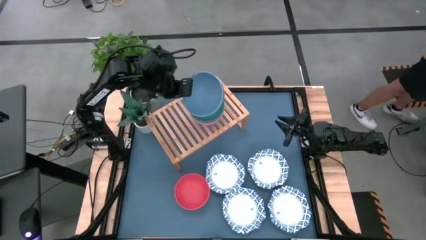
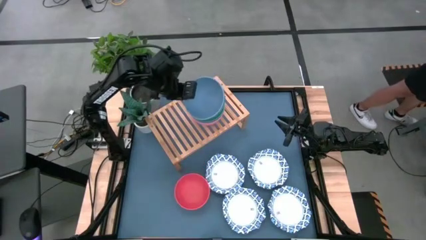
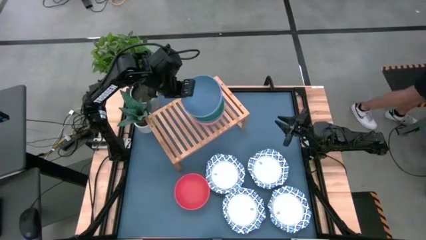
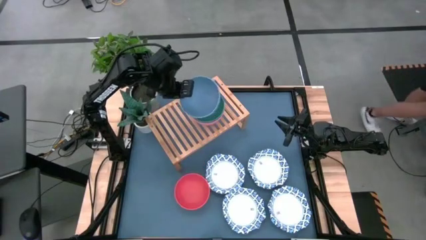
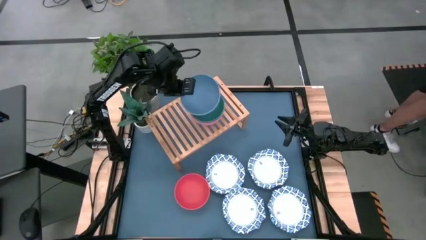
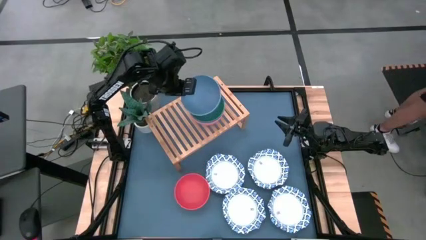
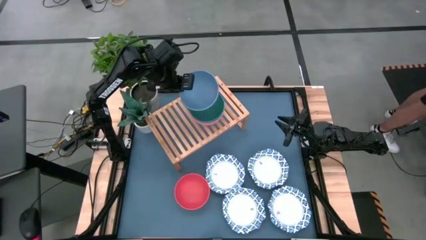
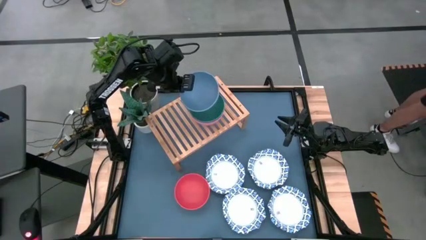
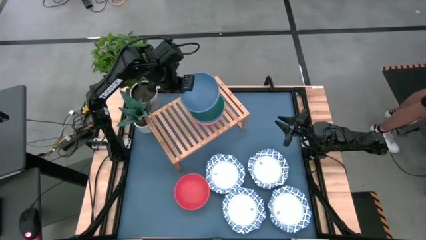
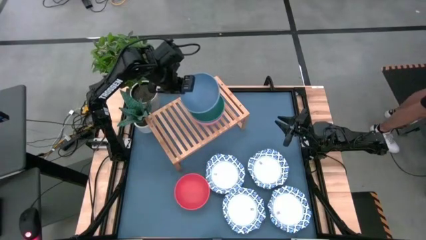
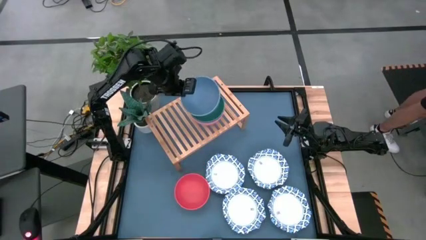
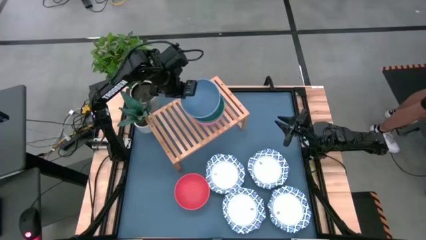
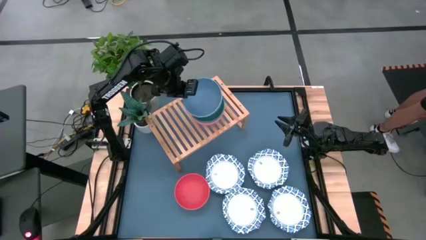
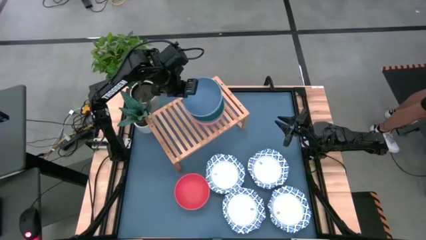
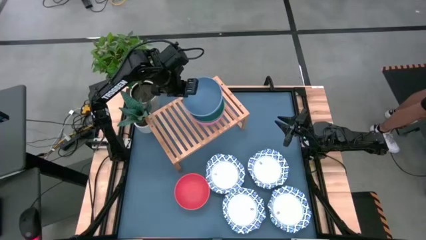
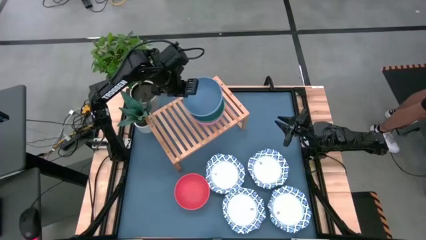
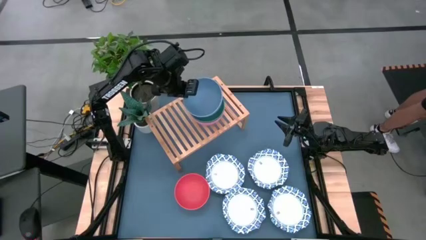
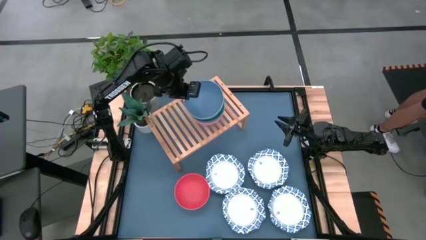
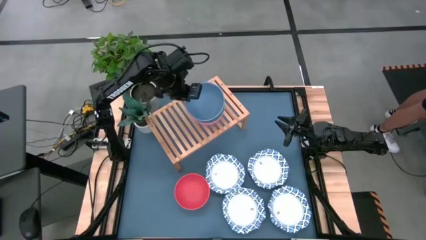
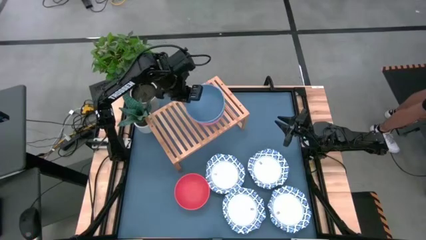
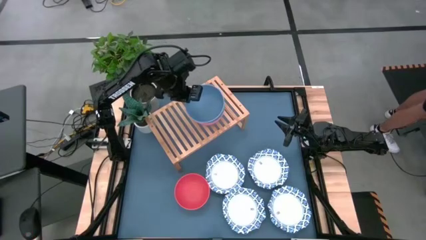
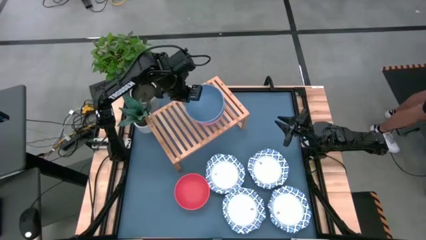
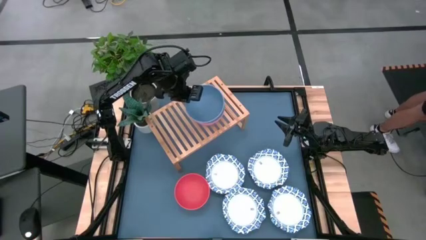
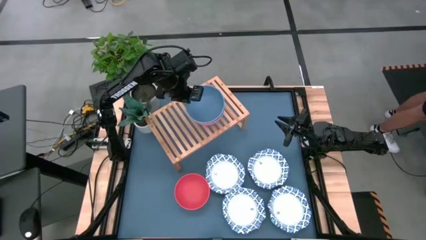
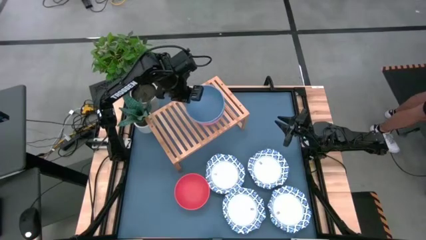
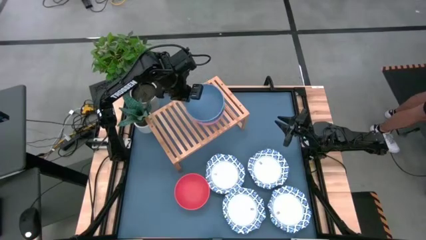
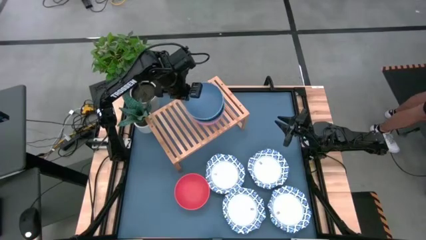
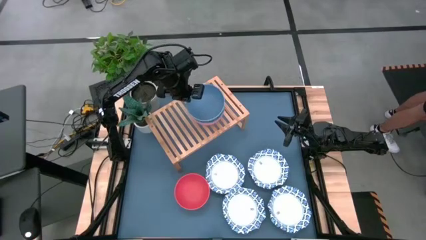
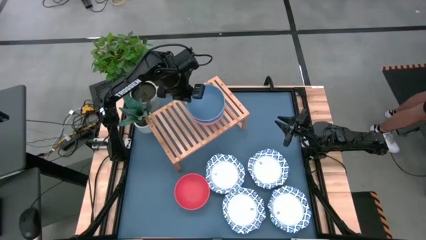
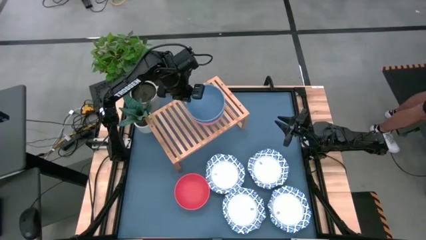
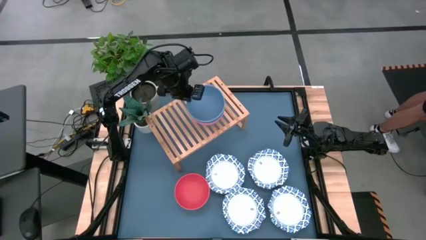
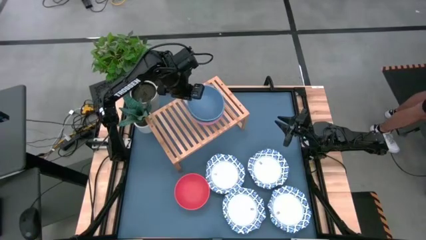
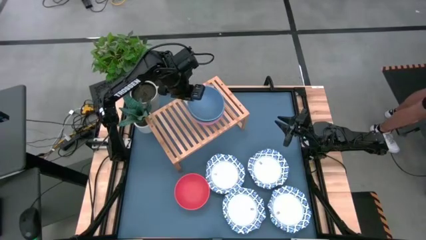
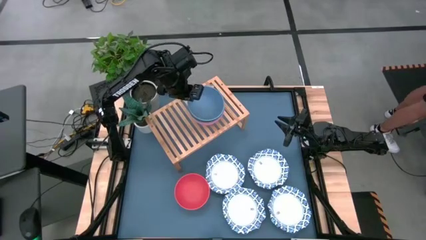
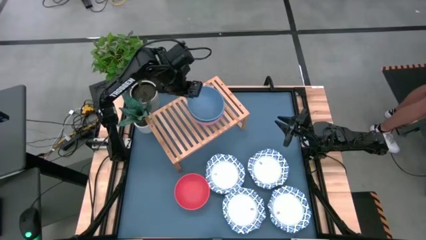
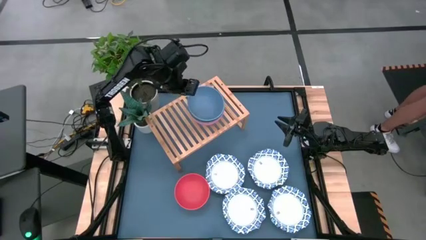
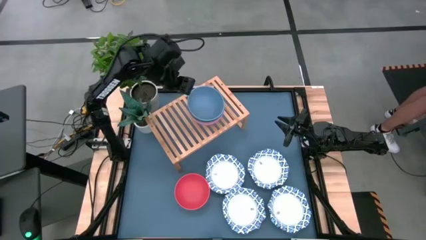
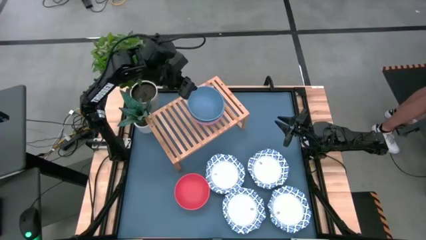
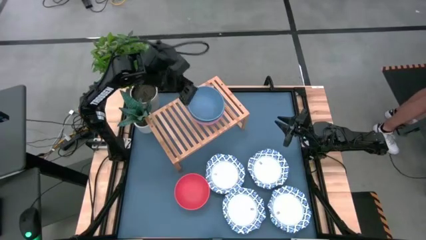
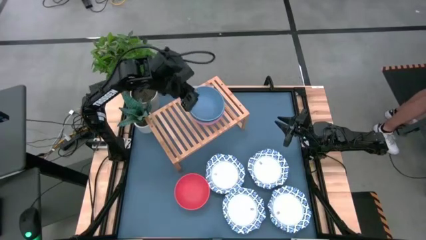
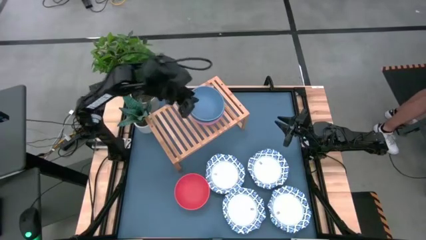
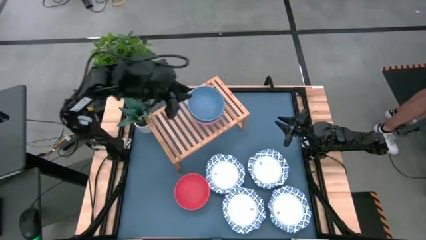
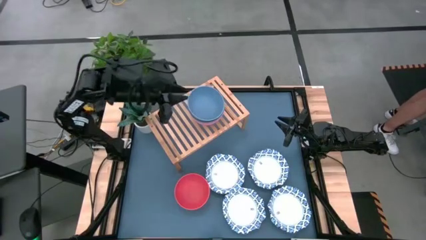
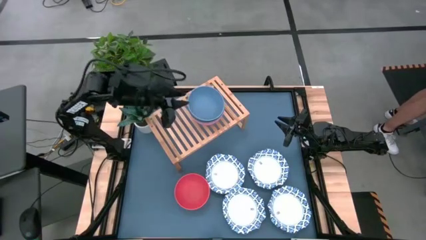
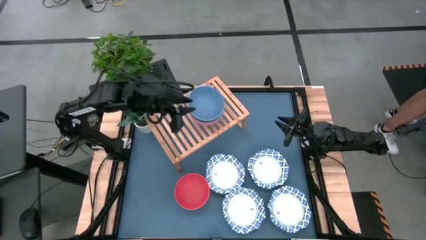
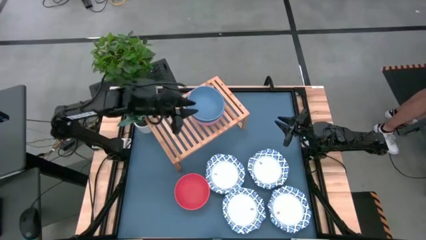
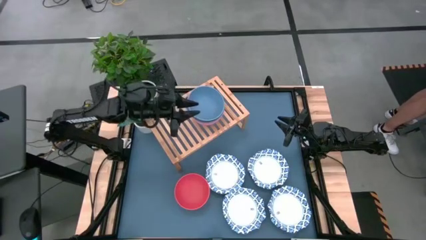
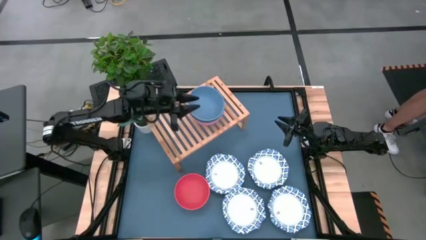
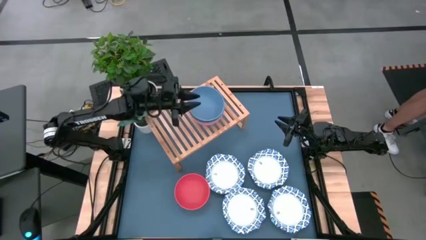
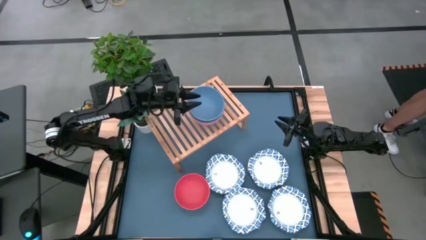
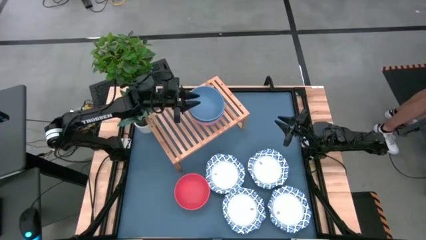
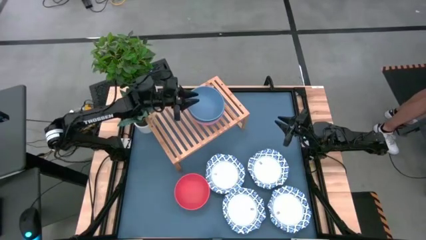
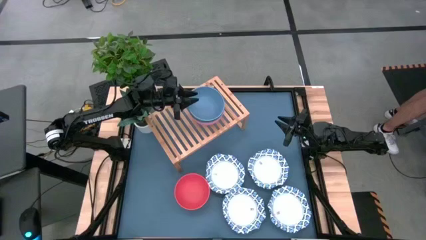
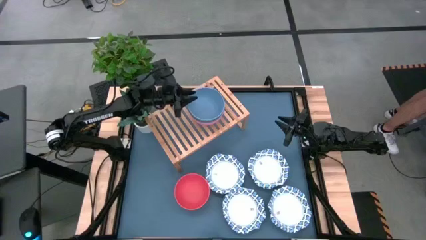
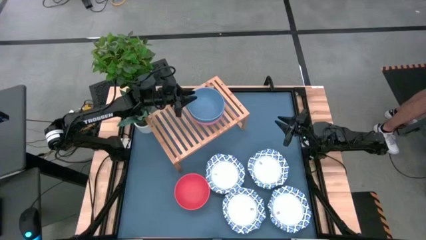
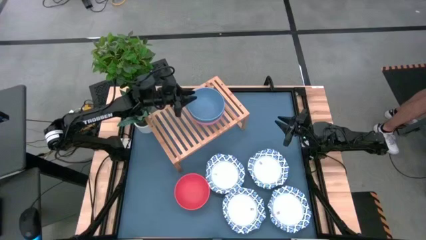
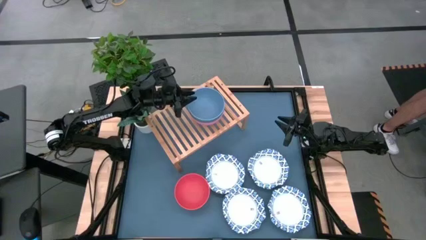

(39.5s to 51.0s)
Task: Place and stack bowls onto a shelf
Stack the blue bowl on top of the green bowl on the shelf
